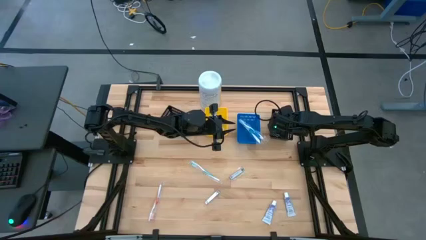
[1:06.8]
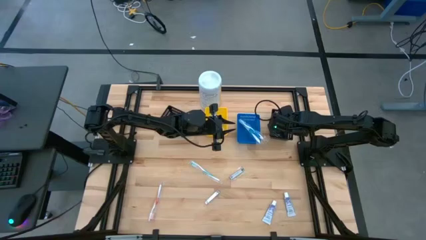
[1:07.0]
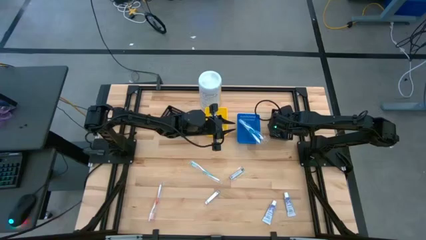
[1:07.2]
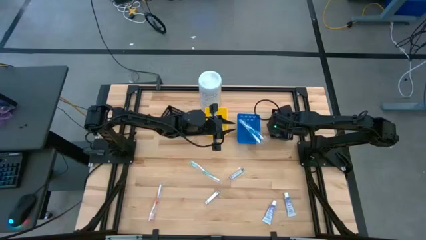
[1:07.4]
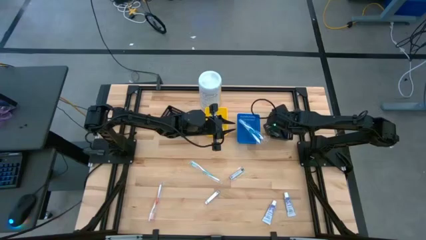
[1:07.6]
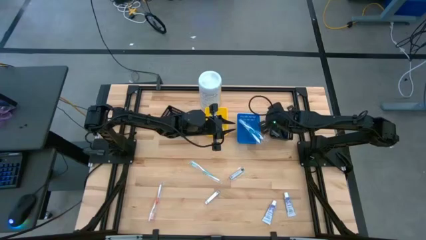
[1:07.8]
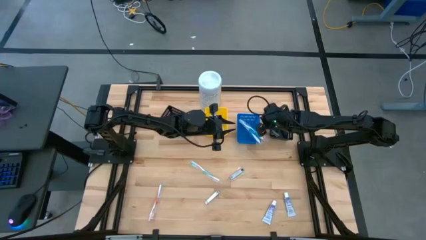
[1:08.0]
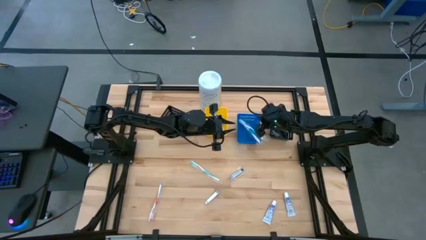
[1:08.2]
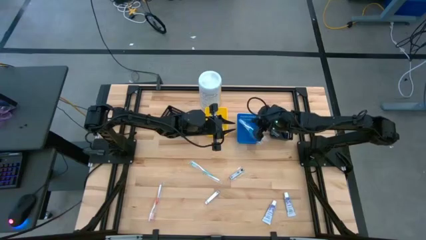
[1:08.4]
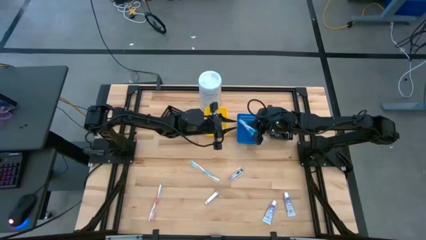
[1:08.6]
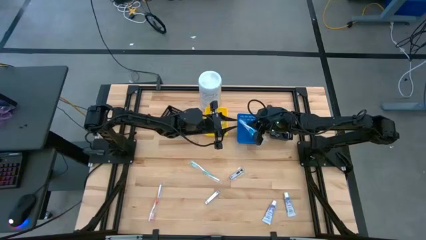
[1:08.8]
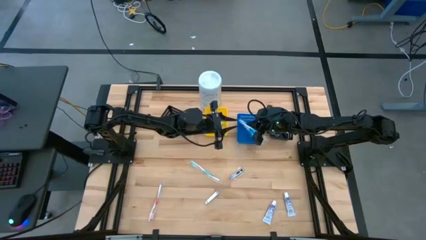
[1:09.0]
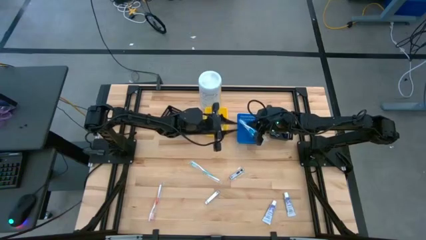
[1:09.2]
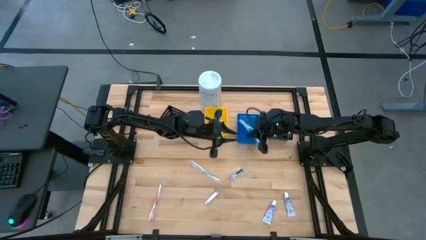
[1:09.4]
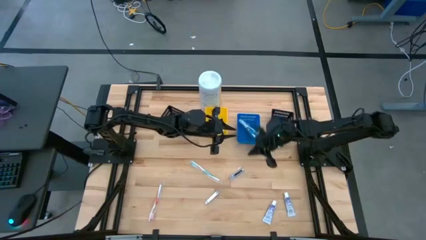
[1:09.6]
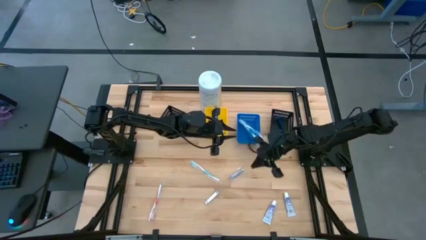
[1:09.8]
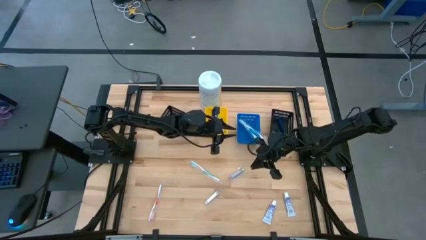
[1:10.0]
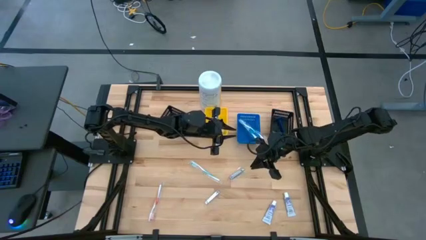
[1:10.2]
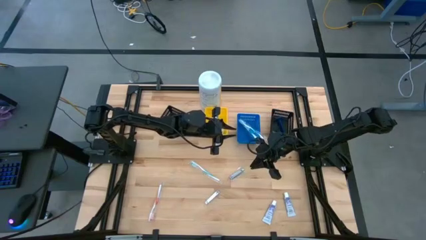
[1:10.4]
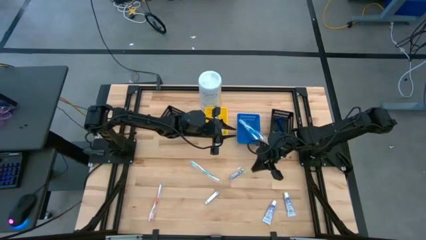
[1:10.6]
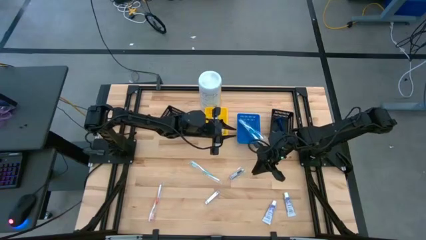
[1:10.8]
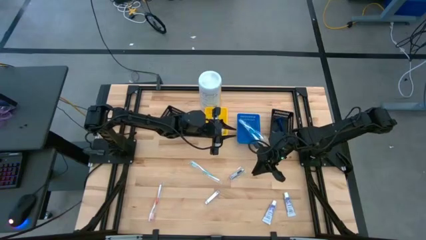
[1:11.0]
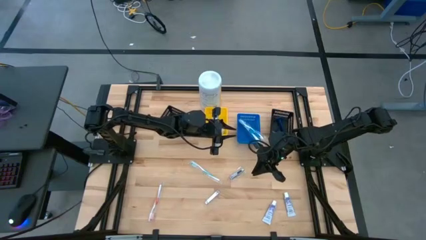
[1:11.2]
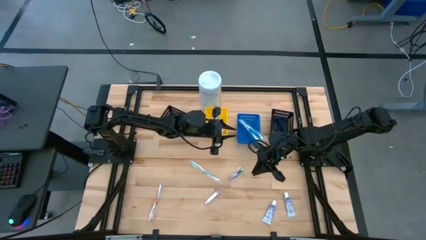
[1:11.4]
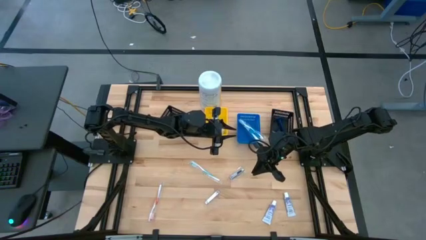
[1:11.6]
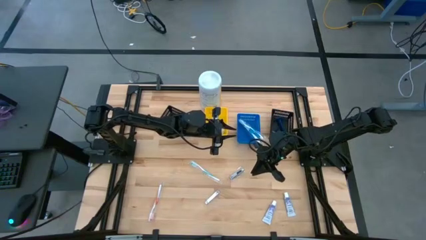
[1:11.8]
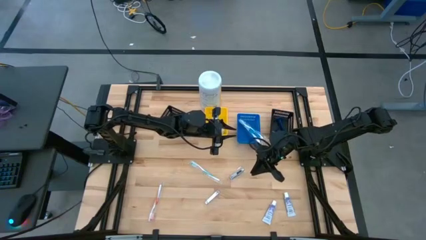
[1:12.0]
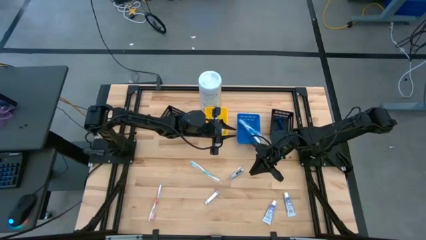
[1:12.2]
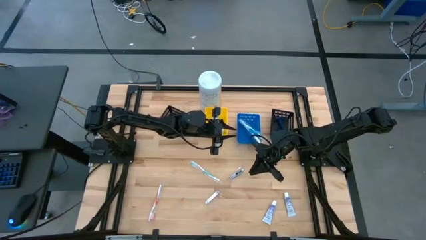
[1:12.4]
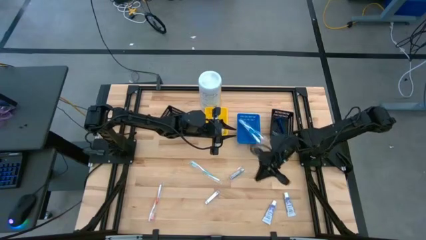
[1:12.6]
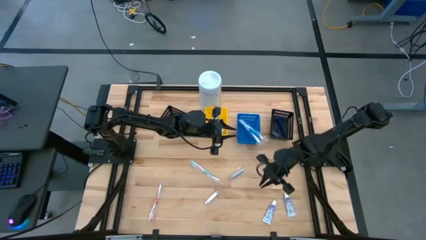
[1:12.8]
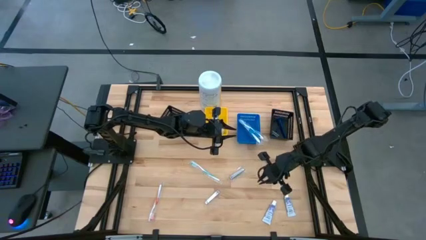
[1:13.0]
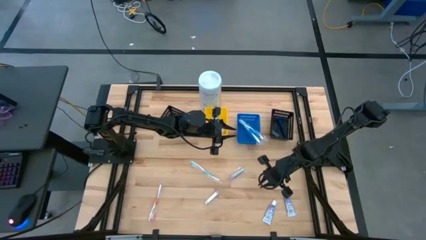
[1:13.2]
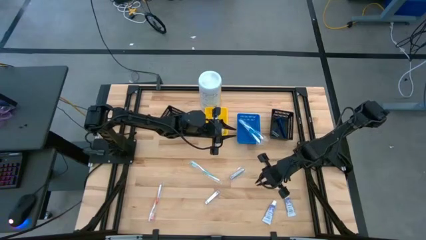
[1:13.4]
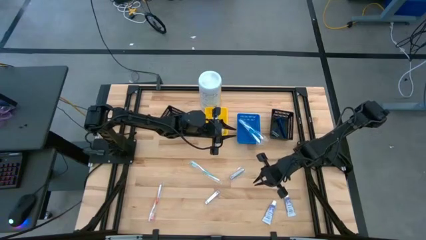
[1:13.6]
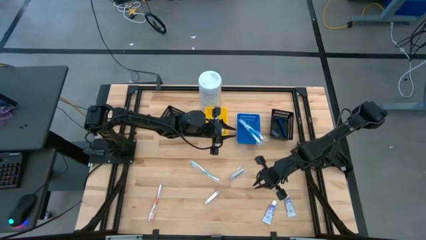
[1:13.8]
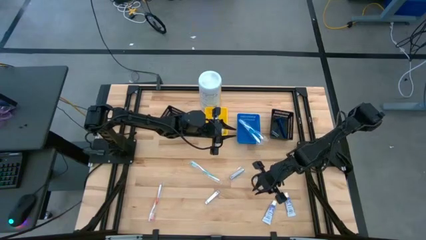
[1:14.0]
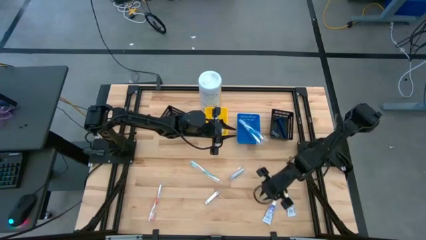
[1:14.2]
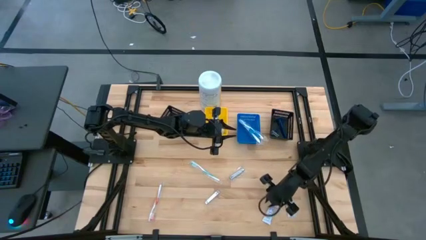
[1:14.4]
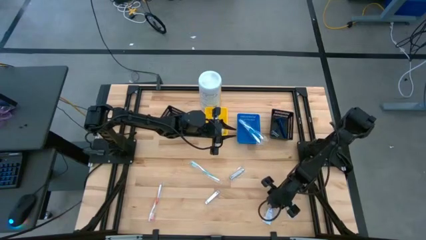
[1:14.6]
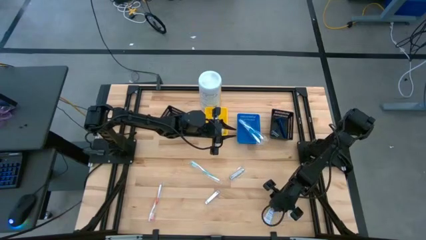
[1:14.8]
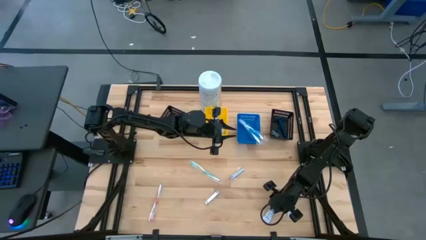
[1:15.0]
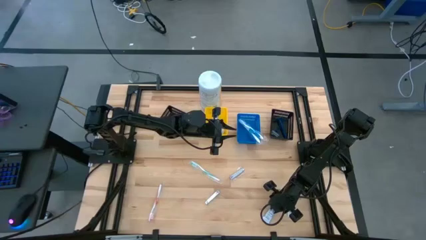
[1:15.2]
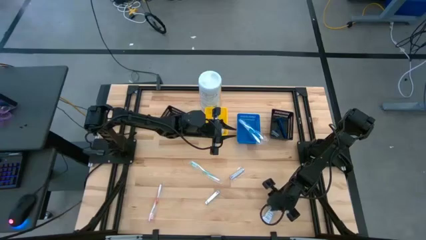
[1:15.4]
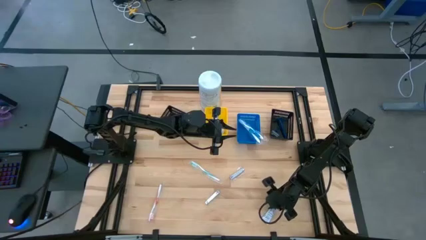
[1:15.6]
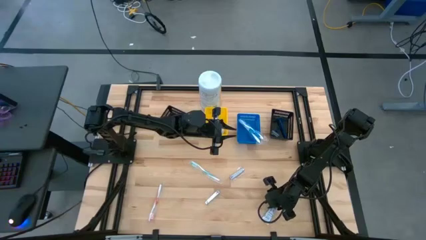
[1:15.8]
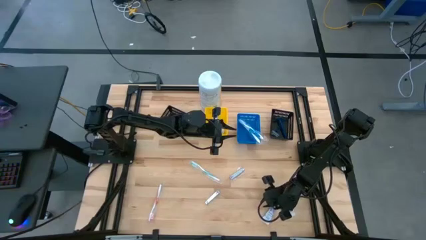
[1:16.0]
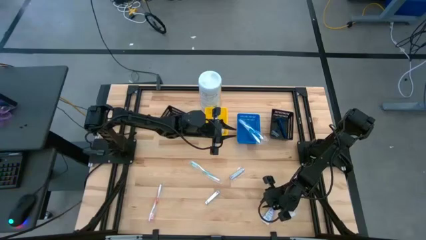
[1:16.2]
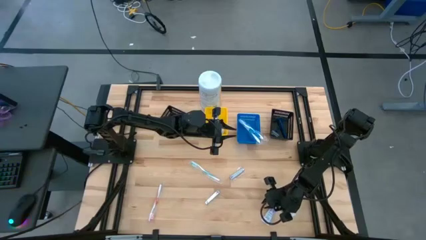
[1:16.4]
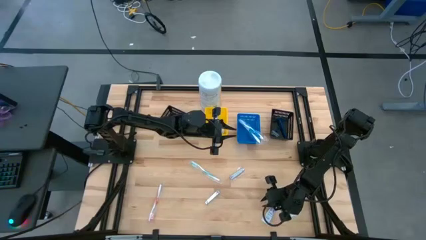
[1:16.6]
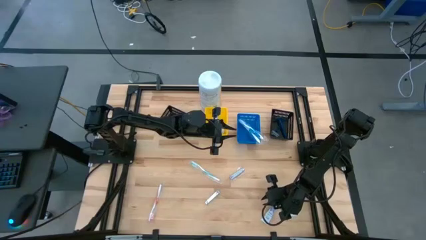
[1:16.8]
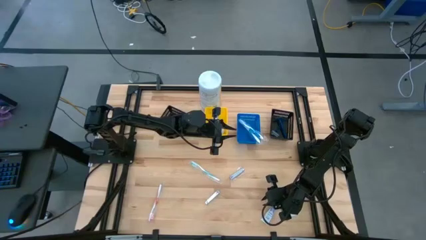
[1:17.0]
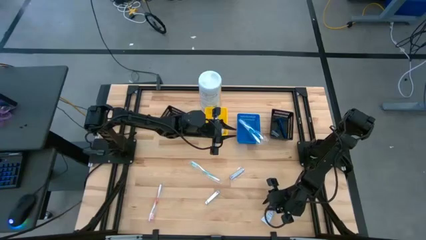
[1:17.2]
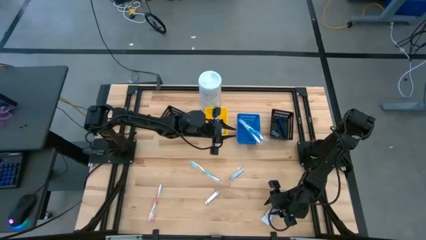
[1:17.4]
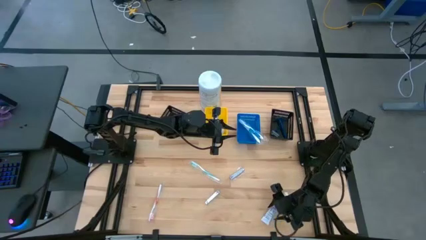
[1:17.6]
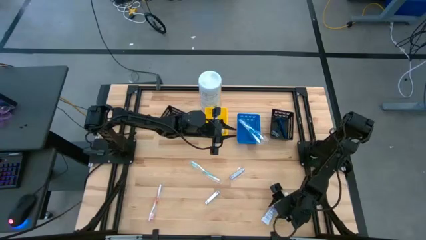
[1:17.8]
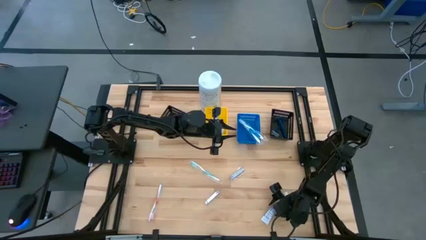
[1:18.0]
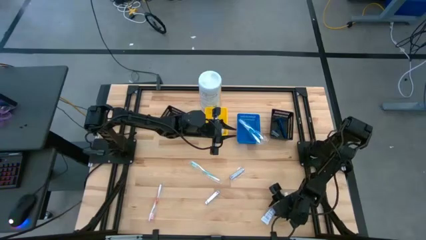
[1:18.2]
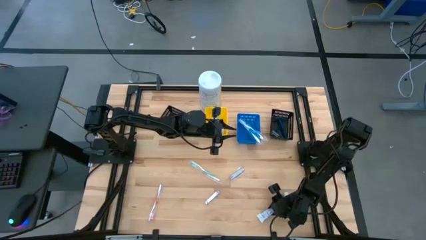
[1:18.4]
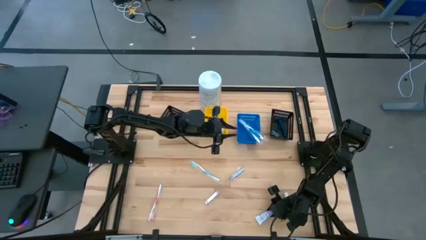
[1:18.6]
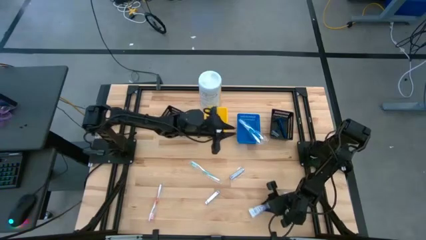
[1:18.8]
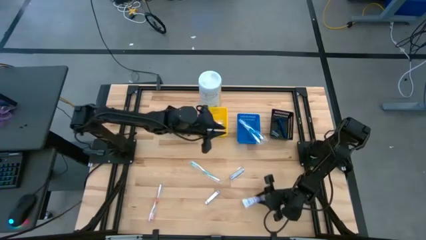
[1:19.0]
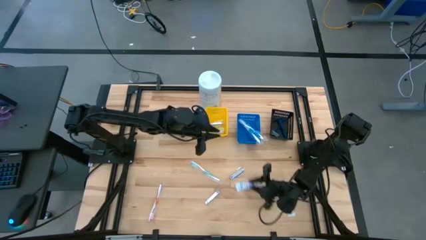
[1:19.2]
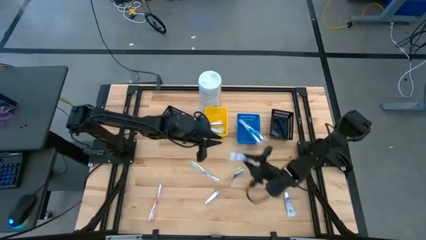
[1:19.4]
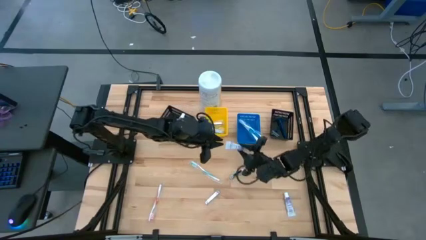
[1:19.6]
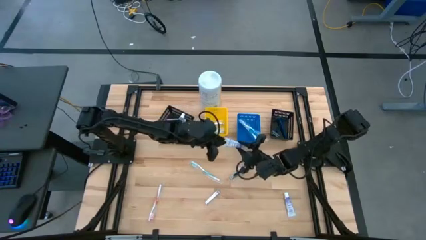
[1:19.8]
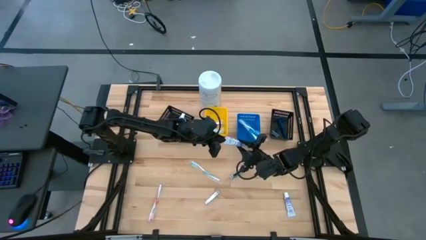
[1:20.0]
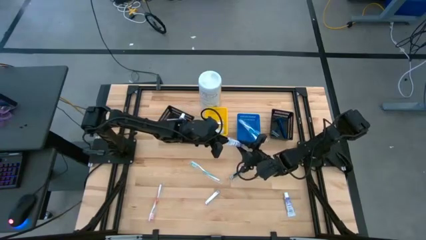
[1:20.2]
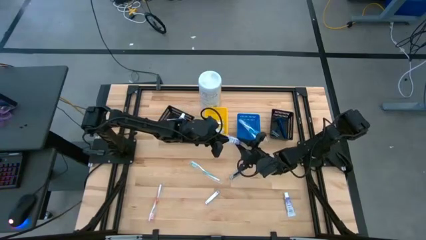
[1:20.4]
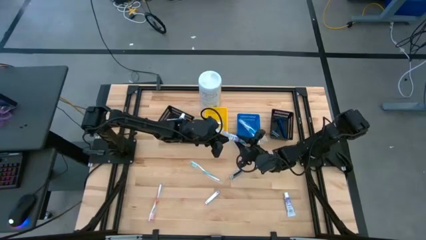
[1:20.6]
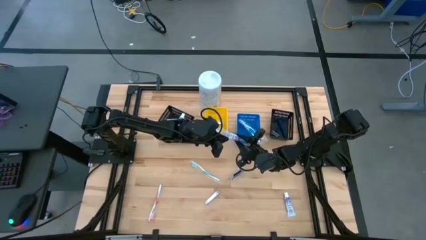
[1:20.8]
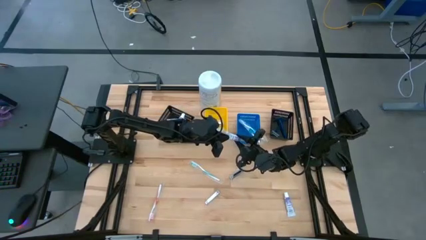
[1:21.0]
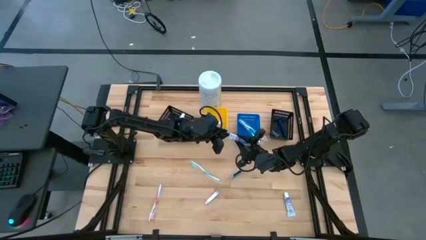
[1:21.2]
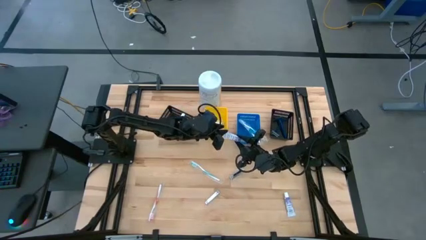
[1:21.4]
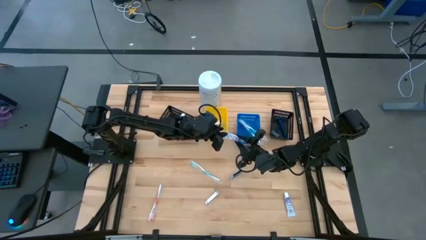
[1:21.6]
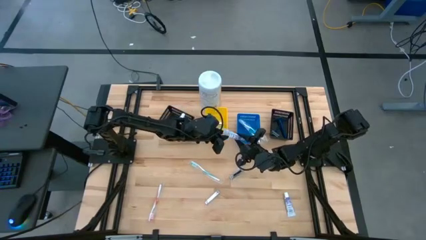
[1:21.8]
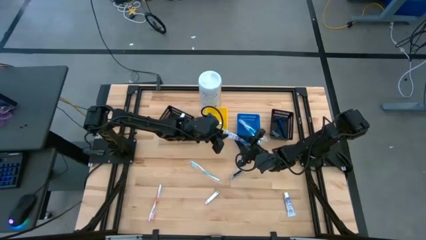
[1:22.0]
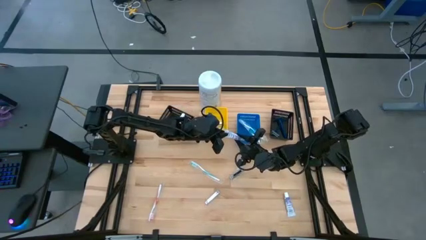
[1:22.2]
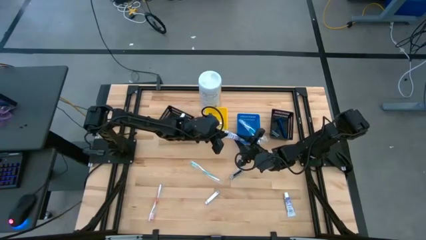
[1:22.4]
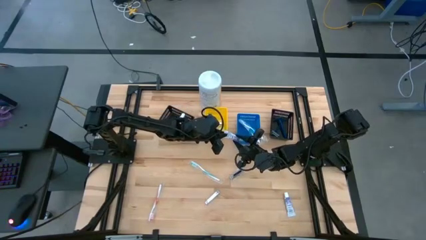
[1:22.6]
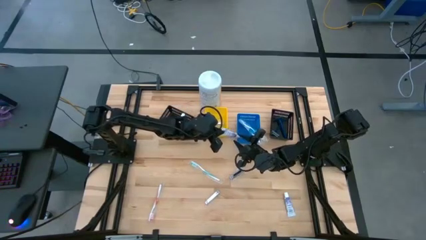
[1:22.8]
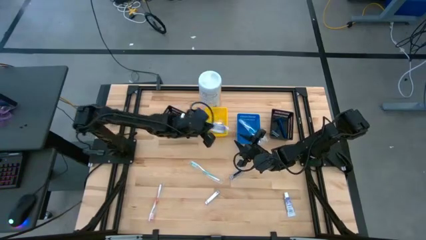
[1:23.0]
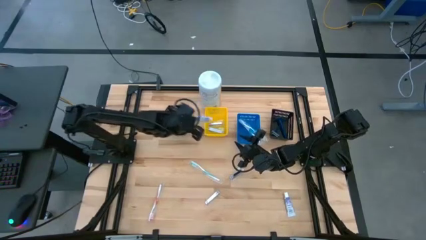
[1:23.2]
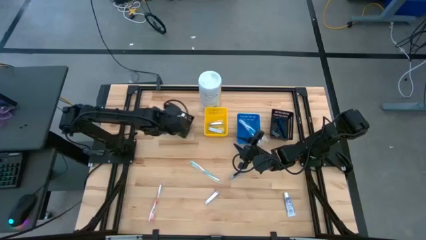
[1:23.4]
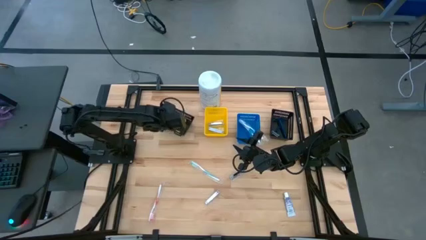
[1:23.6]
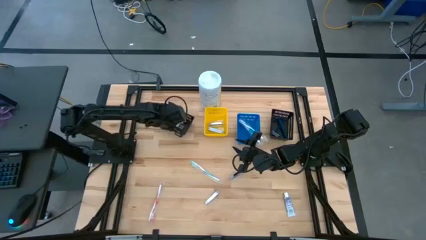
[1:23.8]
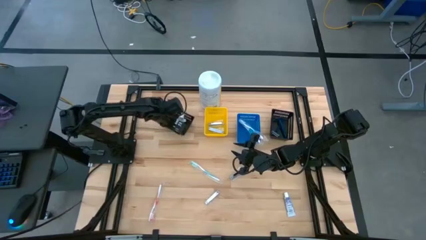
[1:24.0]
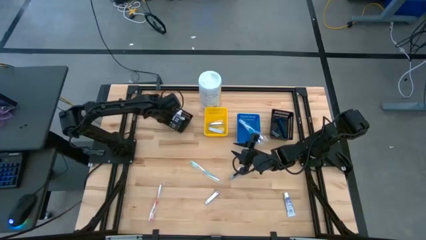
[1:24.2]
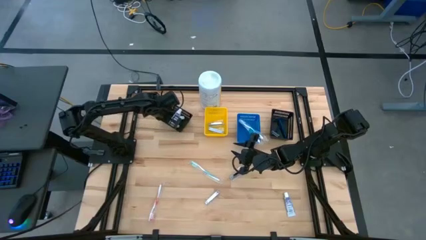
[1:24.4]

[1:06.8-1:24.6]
Task: Pick & Place Travel size toiletries
Put the white toothpaste into the left black bin
